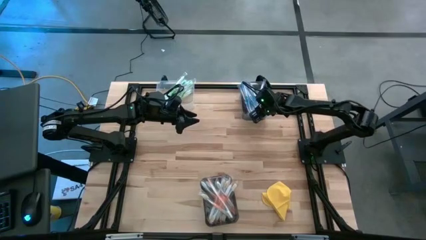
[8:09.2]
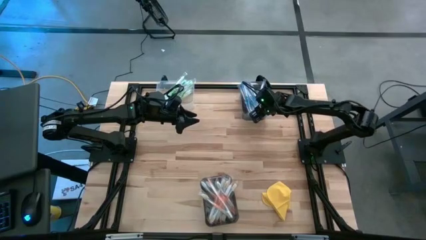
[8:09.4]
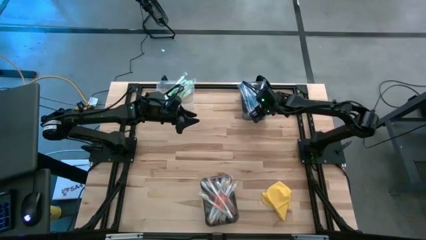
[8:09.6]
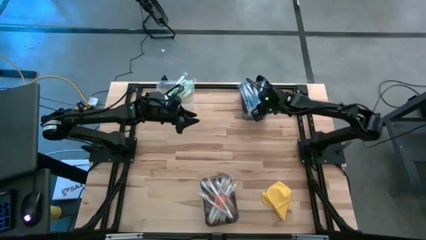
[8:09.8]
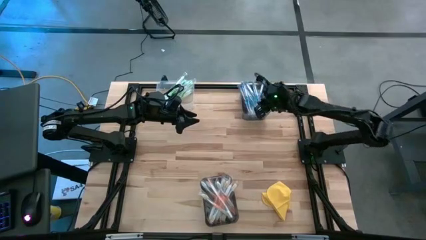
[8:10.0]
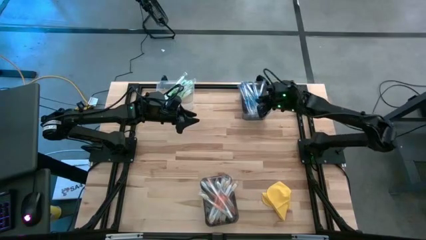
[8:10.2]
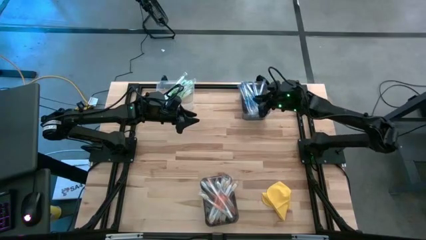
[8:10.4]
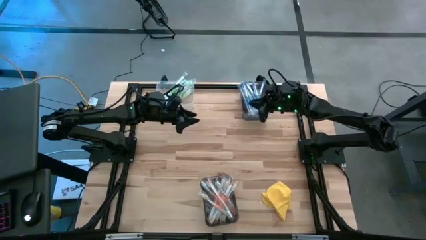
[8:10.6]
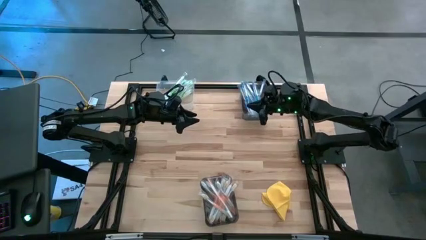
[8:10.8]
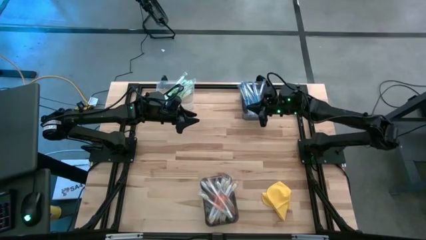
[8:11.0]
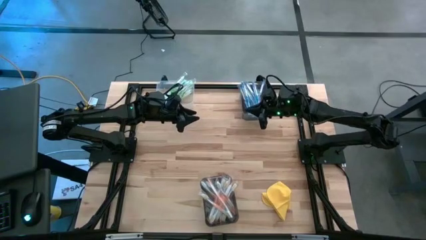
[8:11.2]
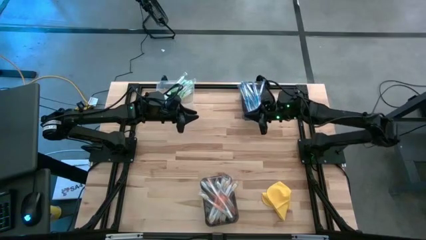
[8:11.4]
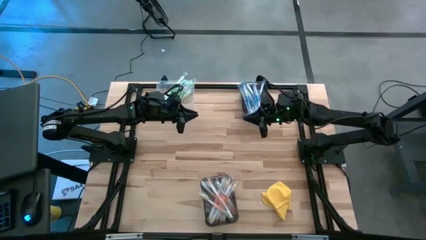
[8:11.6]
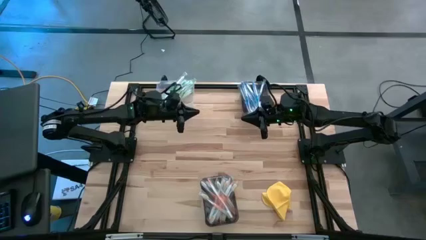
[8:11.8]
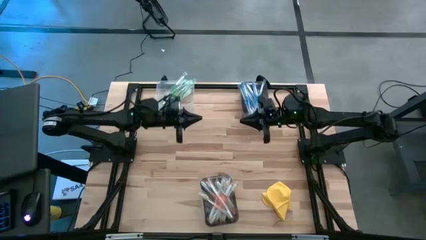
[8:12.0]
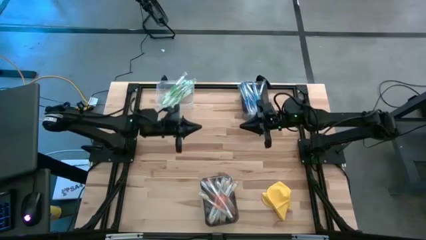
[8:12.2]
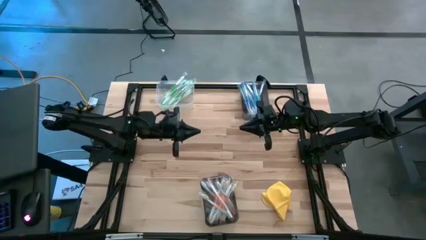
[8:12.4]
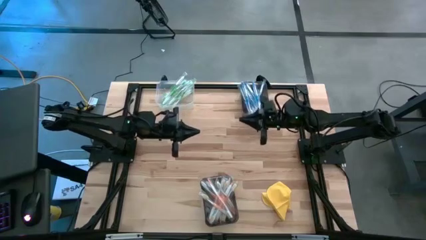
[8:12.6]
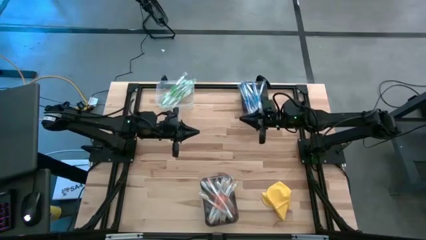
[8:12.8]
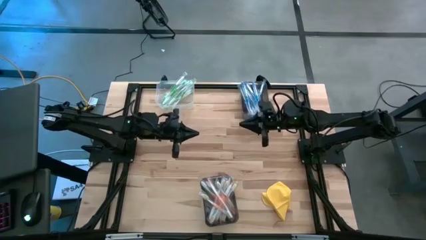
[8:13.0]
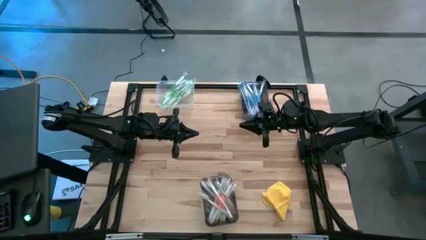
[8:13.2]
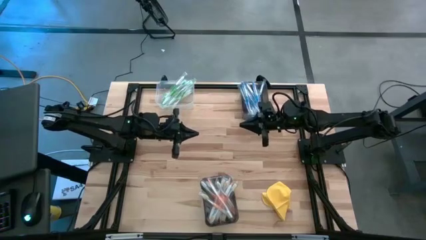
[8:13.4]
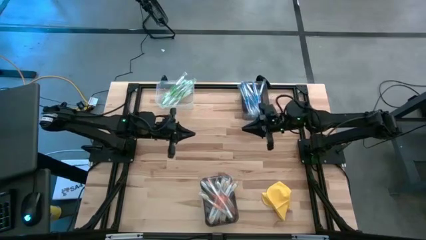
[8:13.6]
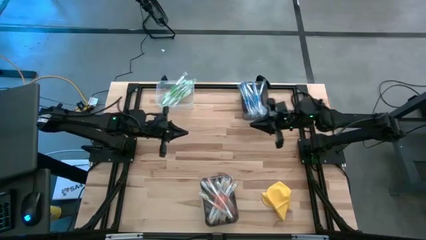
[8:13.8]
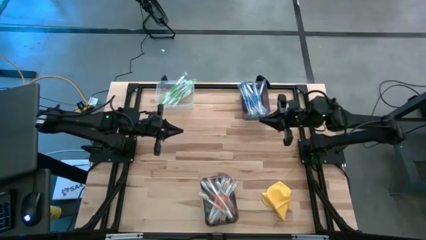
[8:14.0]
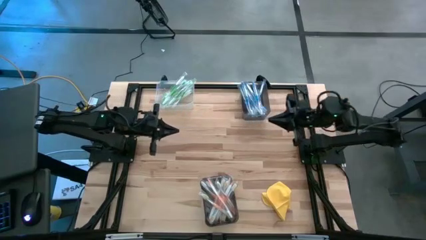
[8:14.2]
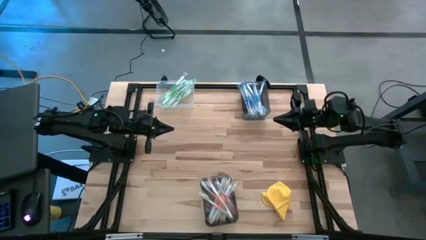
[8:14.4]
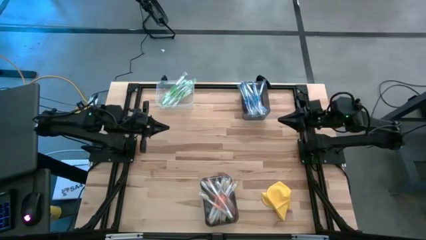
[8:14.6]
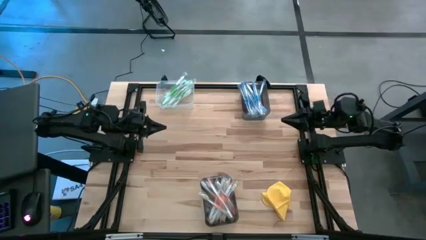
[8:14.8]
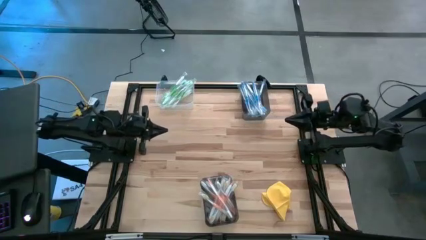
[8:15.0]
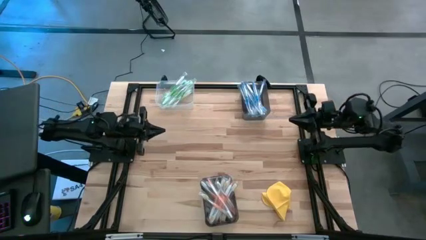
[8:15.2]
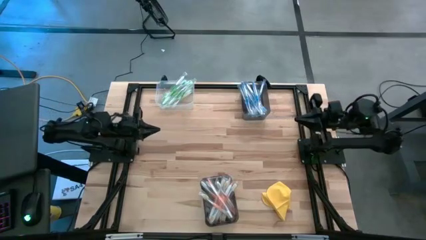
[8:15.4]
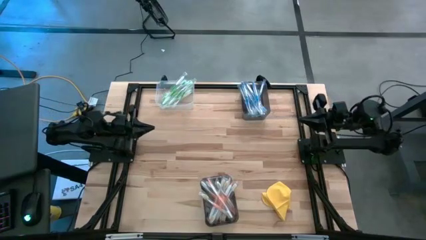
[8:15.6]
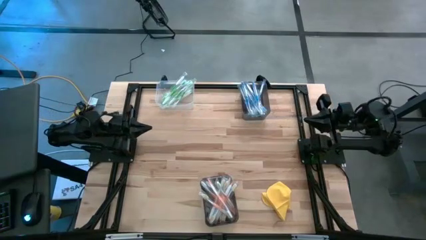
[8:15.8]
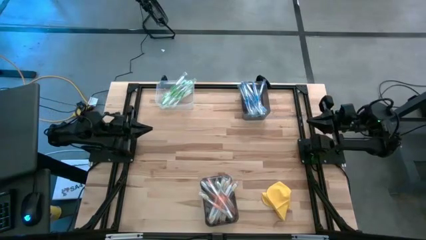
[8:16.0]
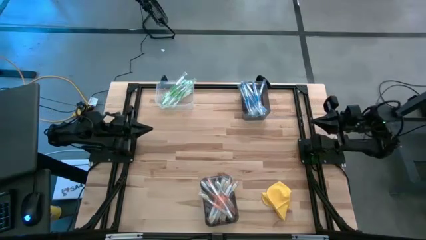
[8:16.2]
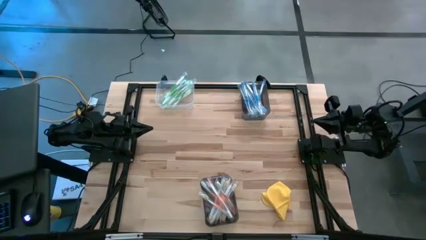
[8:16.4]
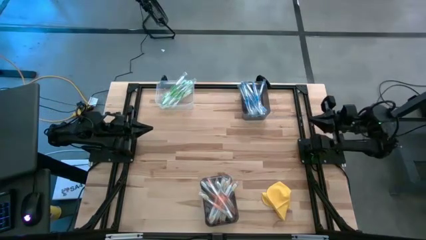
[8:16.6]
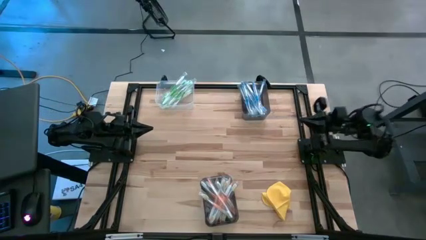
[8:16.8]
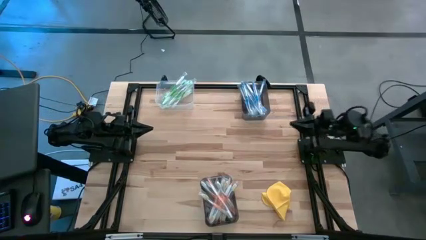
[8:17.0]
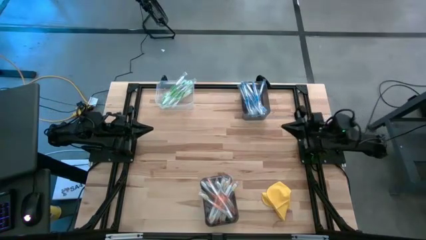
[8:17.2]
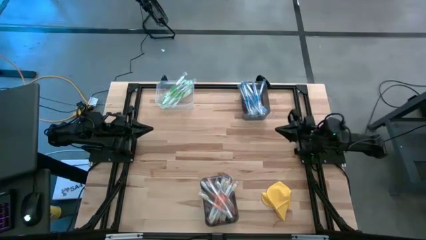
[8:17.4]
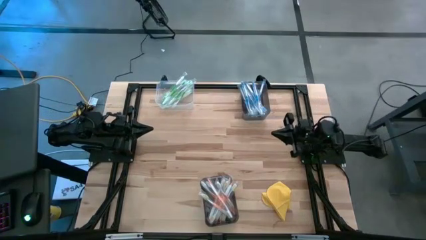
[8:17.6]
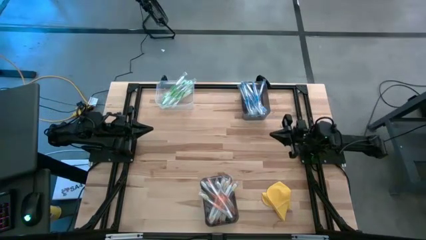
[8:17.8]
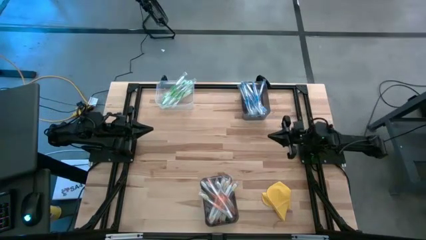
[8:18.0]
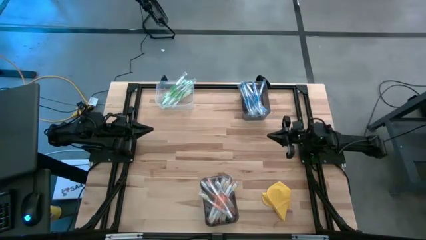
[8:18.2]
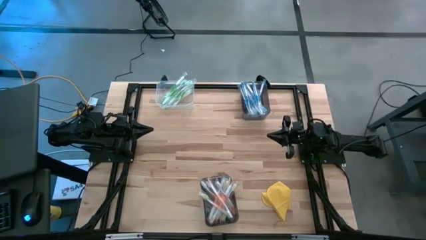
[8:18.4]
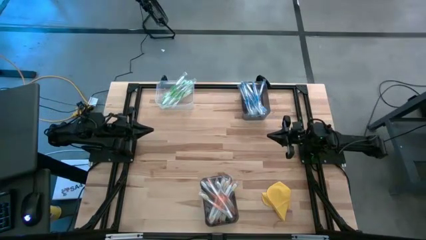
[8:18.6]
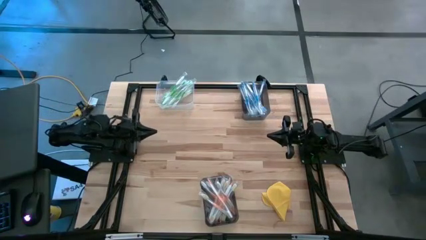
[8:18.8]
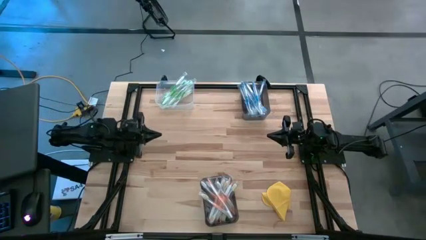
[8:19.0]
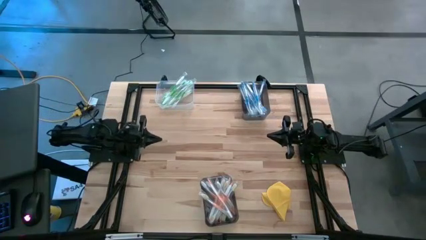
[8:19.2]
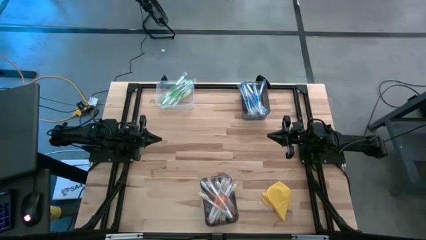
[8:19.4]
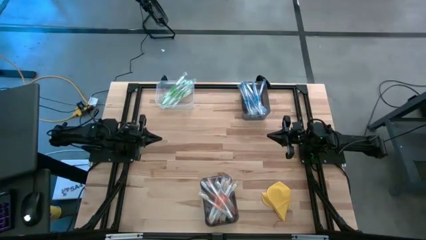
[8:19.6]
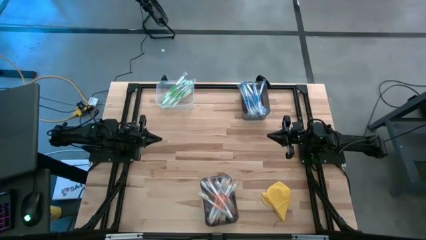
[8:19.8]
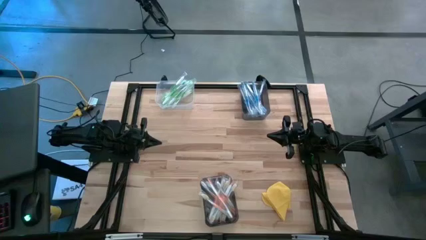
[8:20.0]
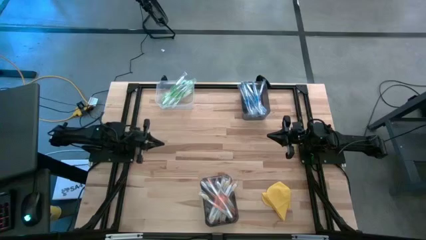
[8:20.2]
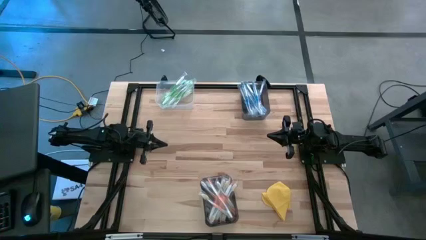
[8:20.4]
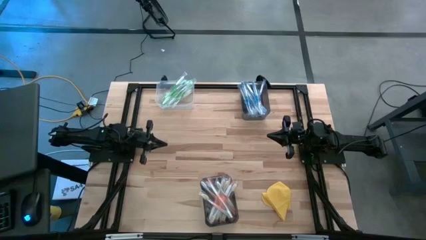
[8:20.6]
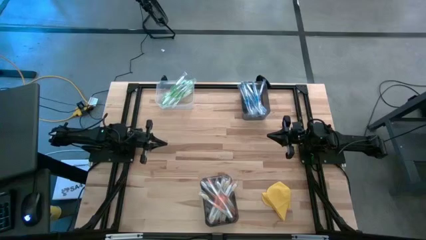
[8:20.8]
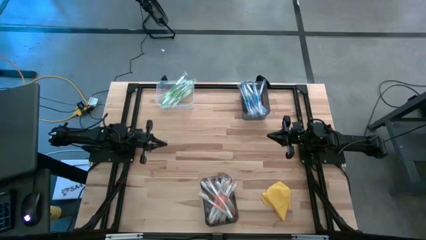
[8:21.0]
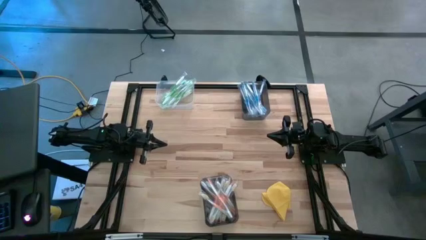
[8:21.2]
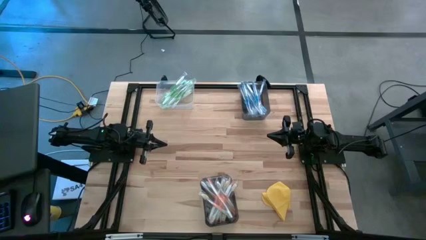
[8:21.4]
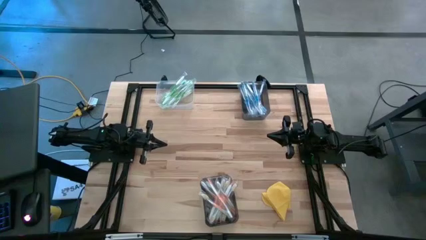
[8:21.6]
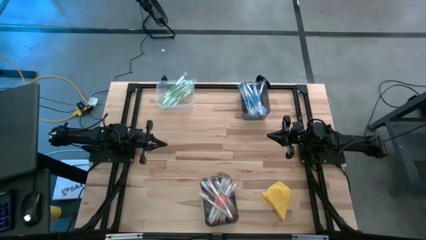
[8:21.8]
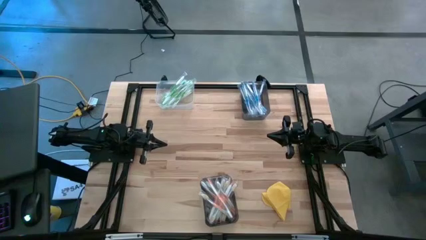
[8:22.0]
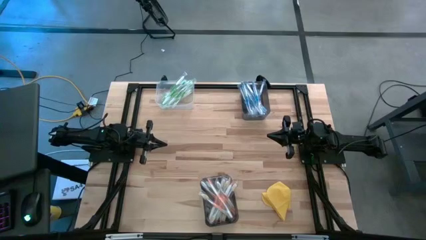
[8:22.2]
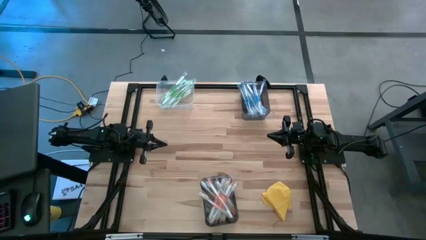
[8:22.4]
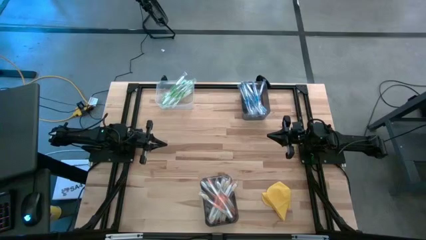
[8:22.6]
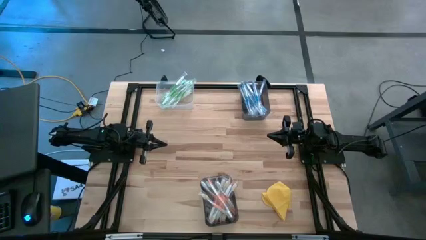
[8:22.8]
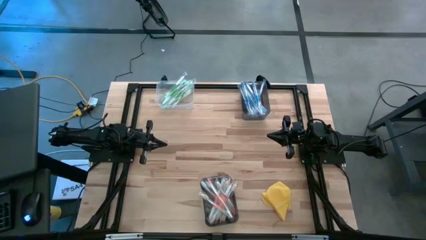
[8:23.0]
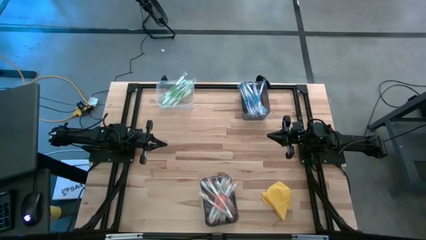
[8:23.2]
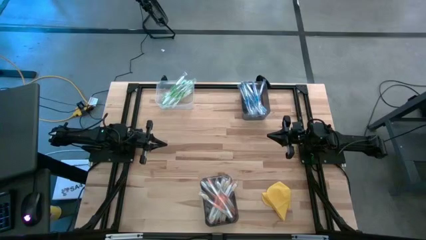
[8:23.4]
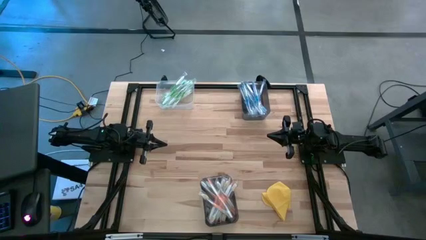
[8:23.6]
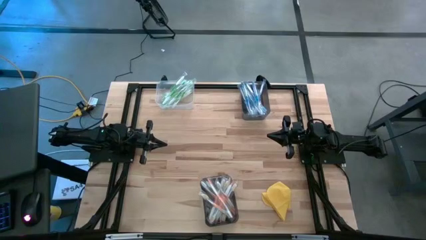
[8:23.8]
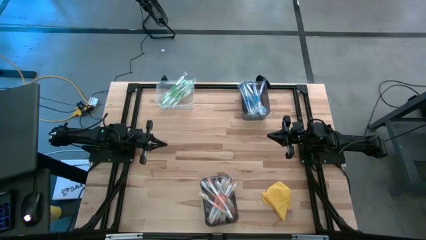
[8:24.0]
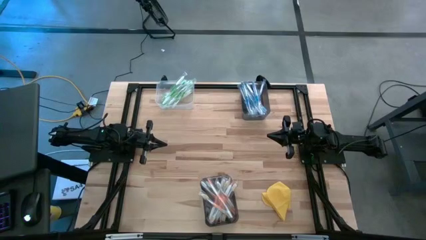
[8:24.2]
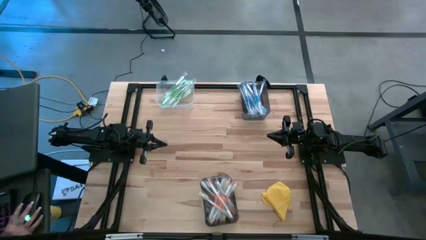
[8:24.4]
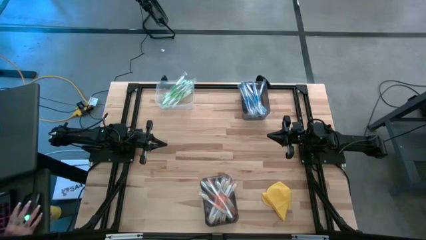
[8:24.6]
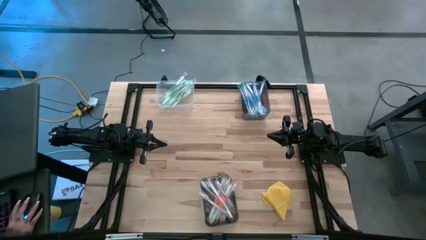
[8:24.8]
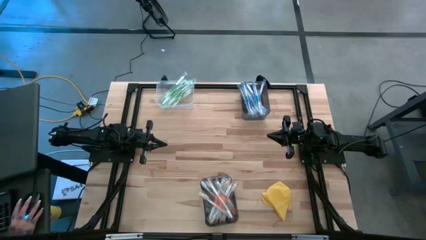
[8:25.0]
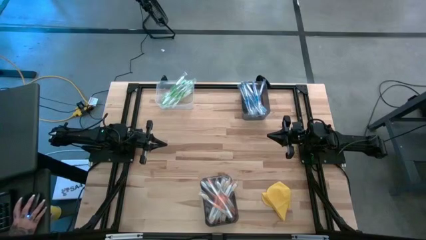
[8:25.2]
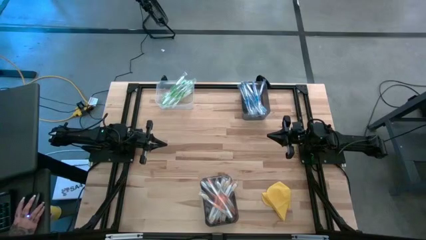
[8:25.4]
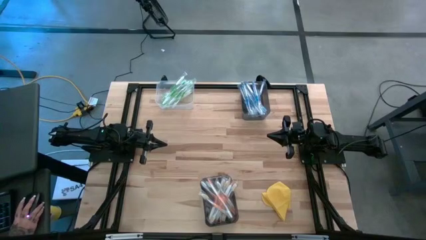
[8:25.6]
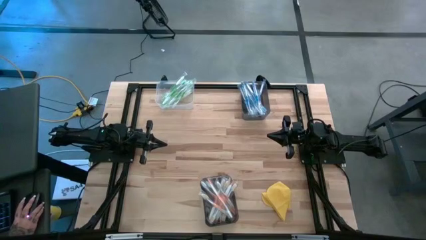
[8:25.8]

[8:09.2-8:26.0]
Task: Pick & Place Toothbrushes
Return to Home Position
